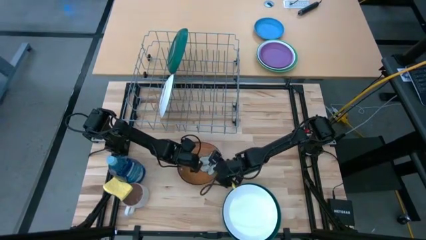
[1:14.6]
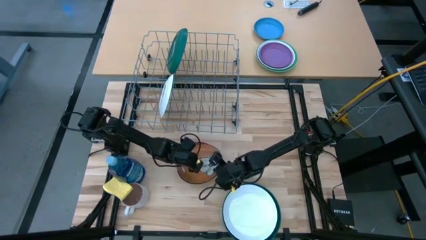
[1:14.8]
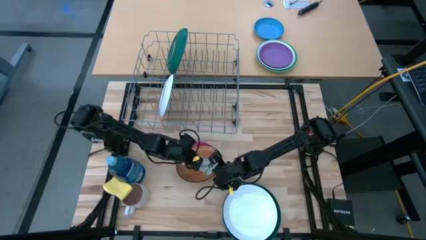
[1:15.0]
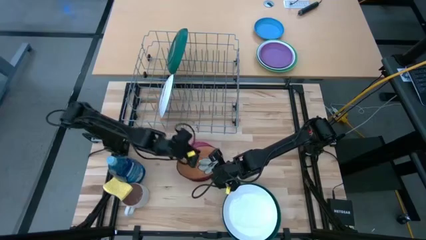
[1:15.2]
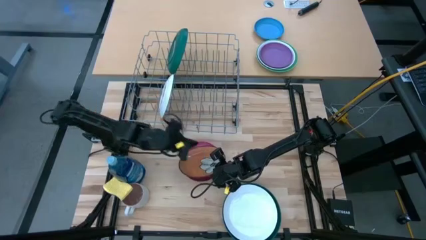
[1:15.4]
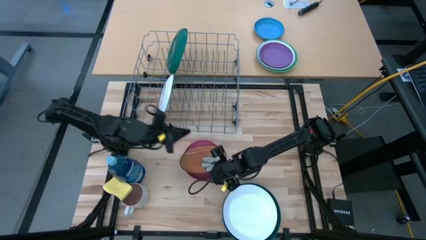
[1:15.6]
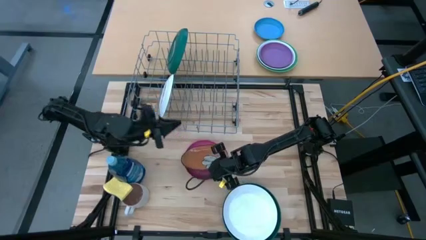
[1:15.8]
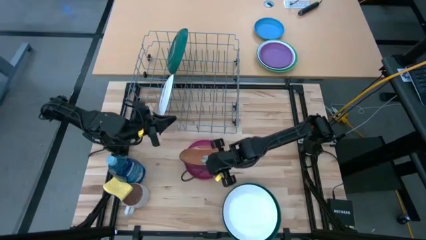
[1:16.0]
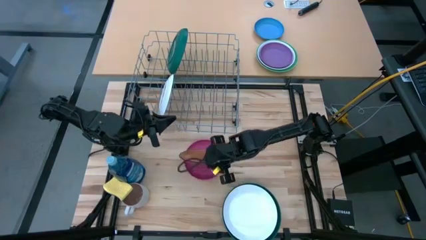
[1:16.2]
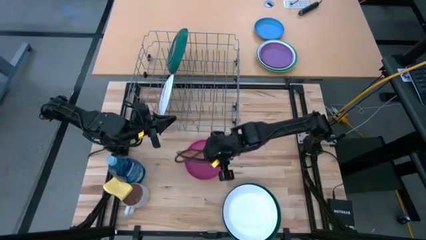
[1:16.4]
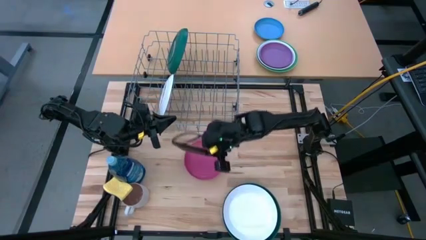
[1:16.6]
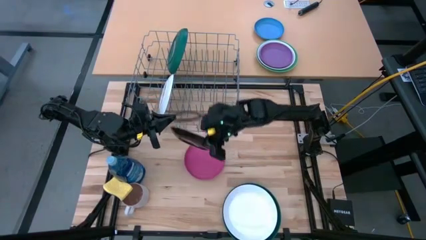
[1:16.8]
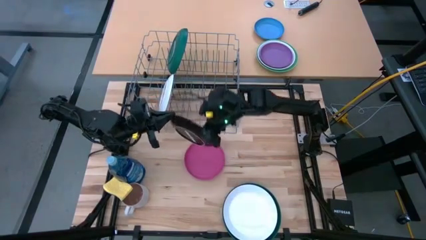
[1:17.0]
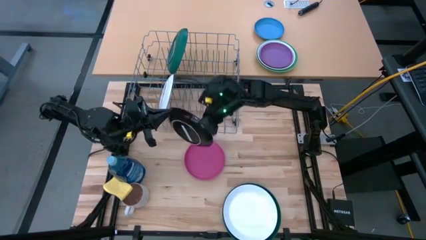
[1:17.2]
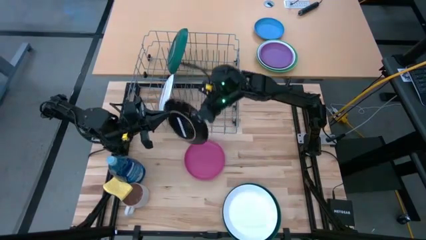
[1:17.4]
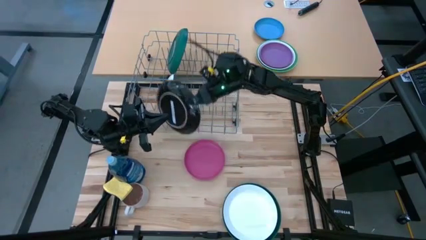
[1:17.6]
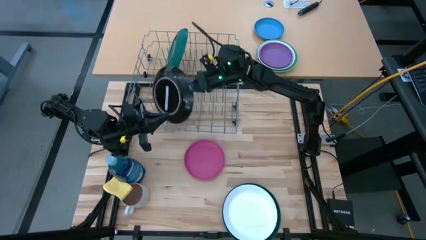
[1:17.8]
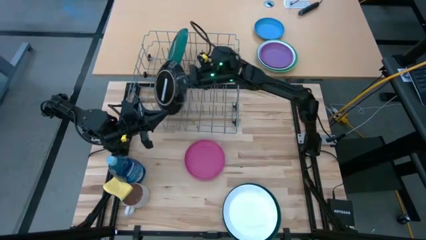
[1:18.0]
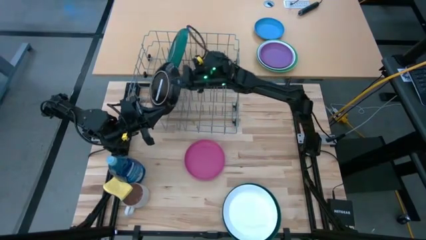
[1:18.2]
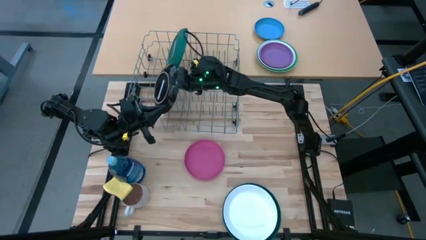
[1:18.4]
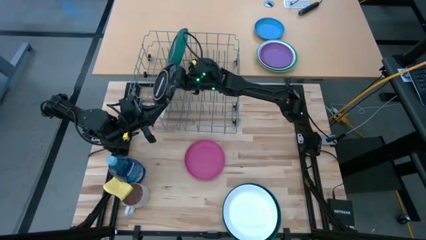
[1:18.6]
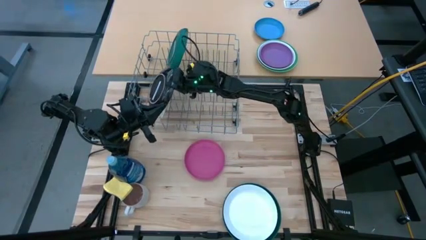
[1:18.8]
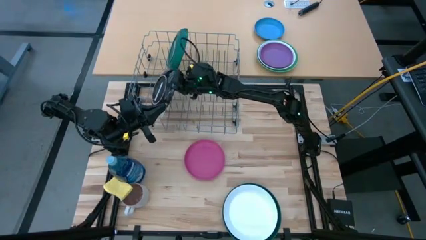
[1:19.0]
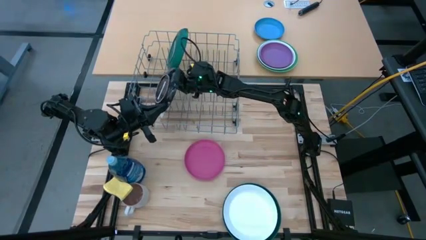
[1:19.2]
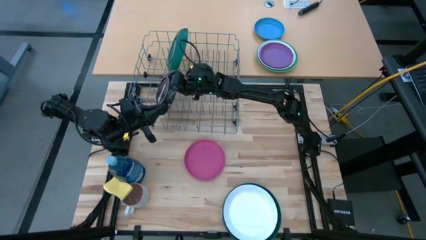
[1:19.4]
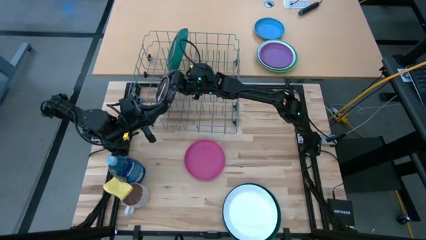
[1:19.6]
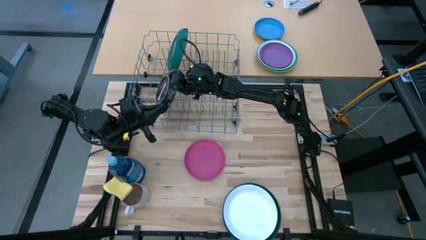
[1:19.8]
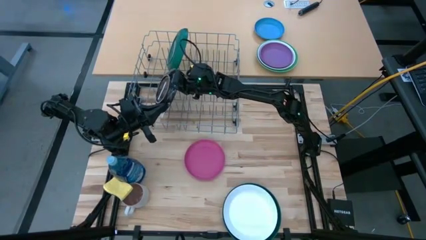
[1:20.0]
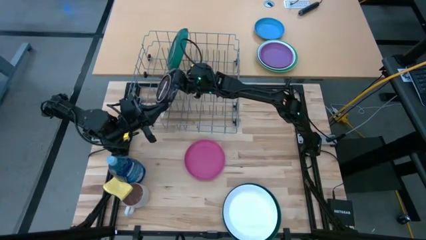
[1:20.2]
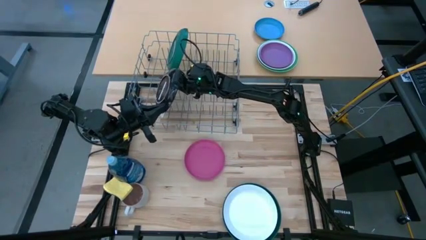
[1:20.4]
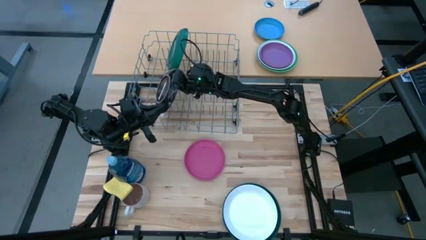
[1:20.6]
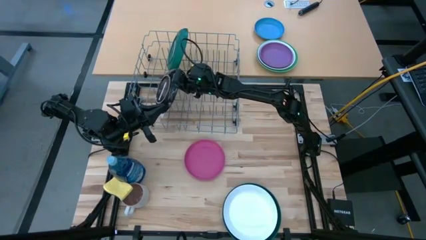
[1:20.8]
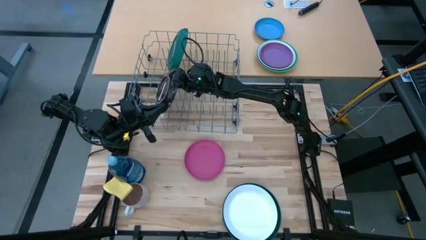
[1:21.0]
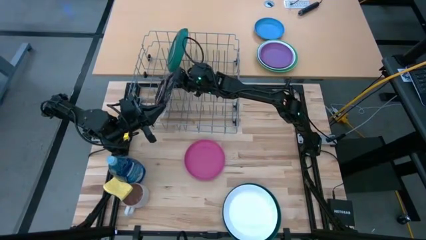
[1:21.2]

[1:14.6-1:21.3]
Task: Sort dishes
Put the brown plate on the dish rack

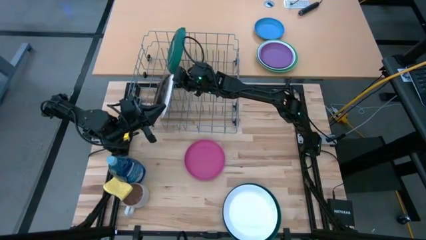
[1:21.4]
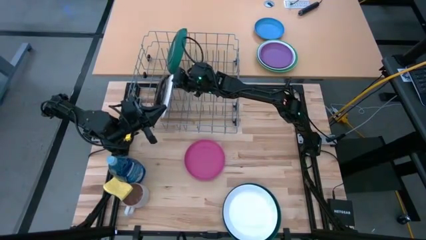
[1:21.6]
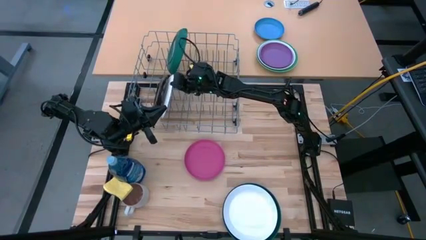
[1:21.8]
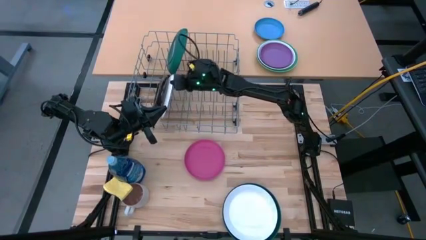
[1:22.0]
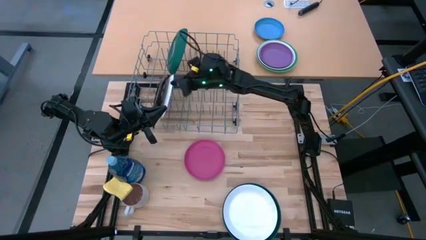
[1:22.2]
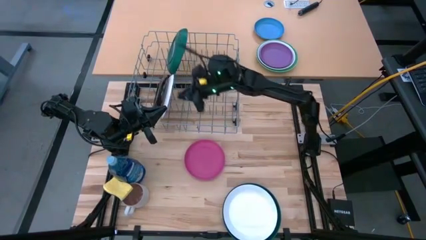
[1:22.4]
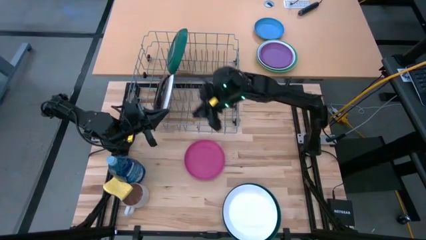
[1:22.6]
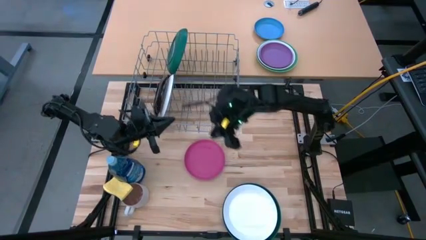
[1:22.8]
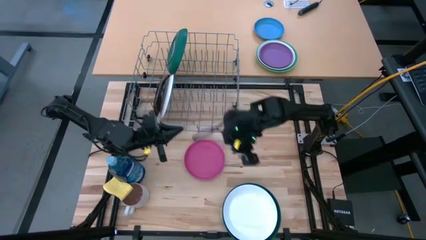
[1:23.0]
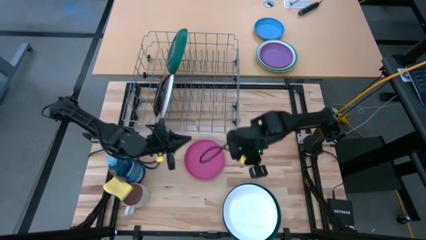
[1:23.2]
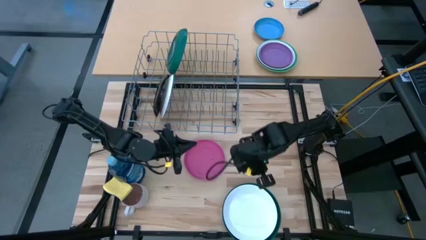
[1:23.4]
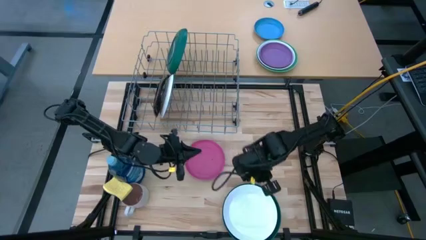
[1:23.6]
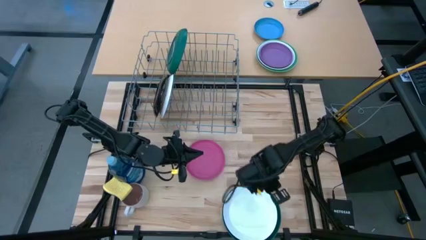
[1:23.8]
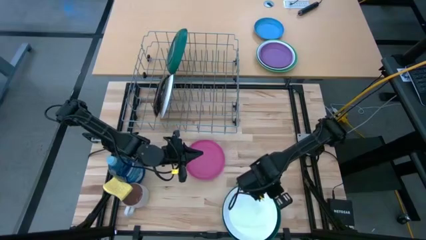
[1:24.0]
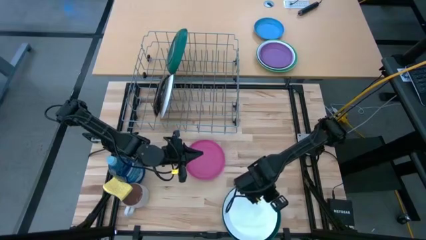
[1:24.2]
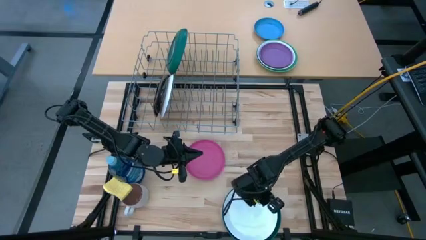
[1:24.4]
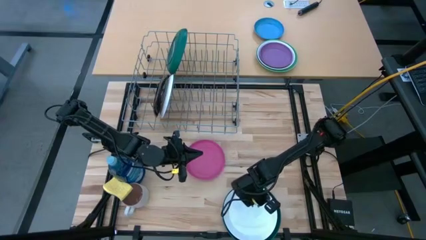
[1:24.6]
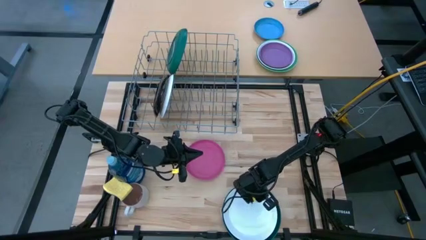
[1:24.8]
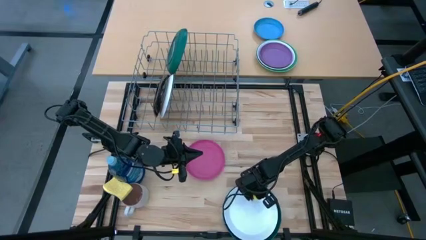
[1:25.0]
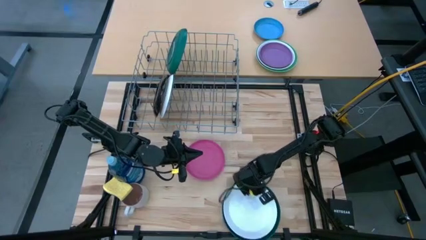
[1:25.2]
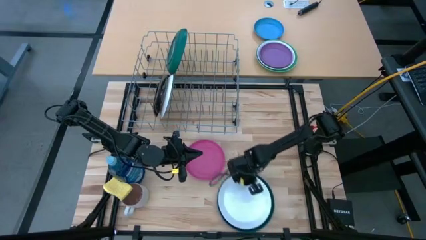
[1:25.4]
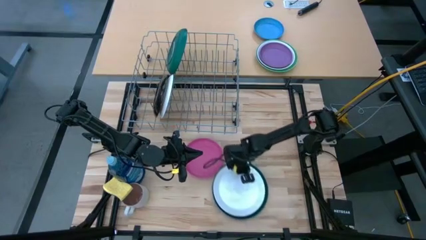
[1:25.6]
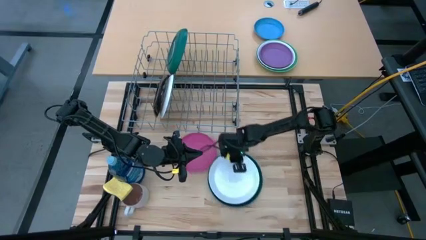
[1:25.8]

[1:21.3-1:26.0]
Move the stacked plates to the center
